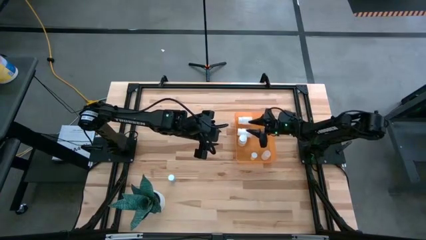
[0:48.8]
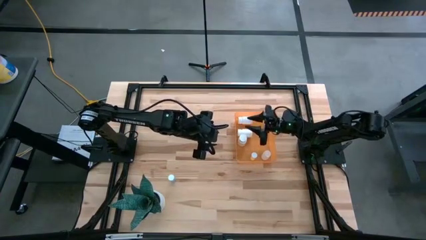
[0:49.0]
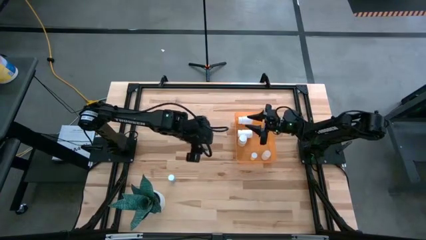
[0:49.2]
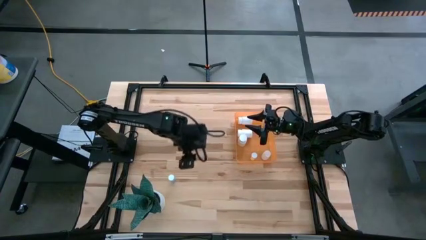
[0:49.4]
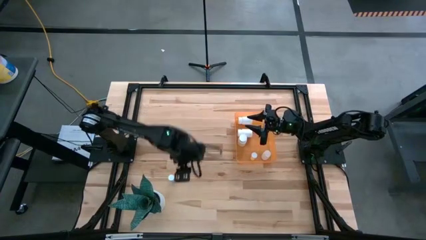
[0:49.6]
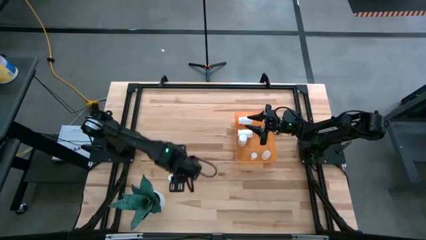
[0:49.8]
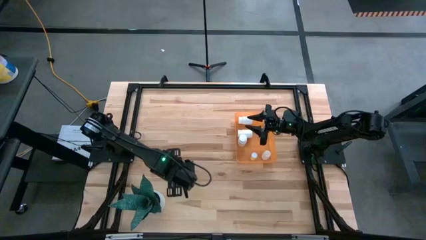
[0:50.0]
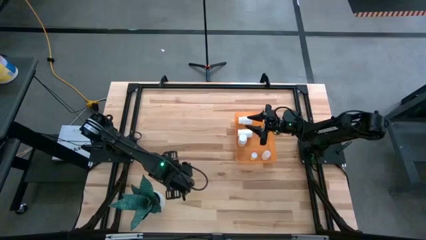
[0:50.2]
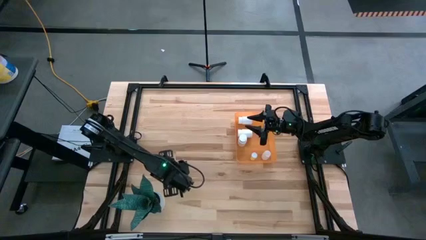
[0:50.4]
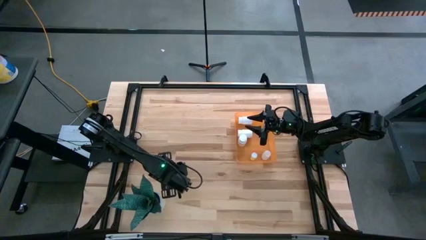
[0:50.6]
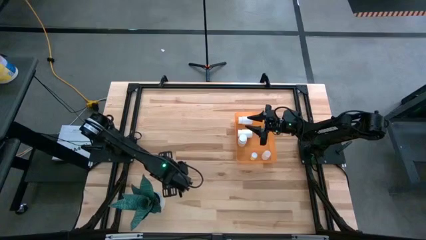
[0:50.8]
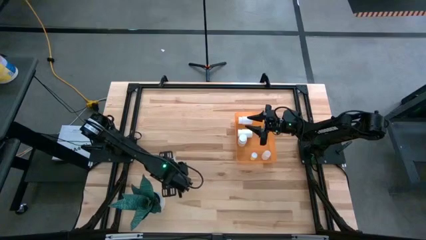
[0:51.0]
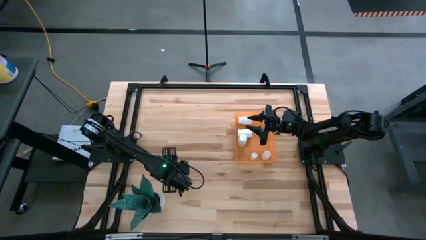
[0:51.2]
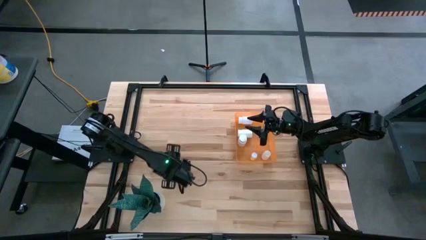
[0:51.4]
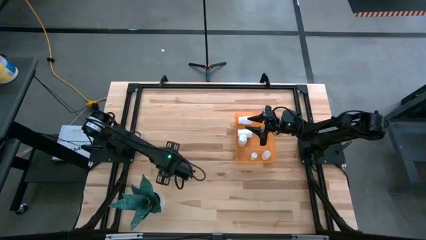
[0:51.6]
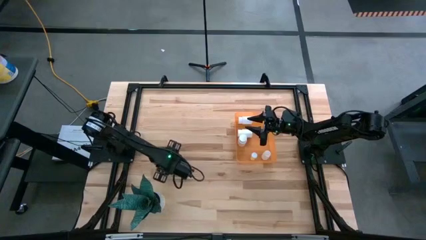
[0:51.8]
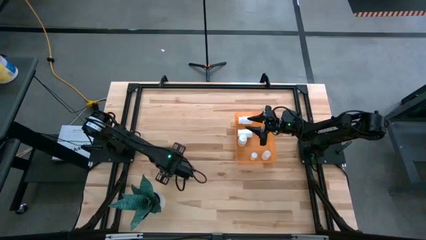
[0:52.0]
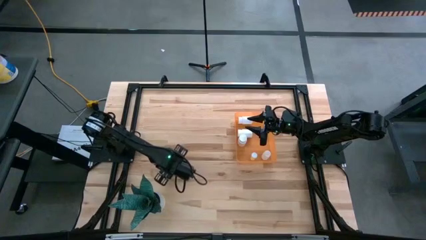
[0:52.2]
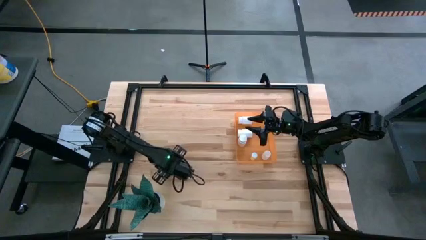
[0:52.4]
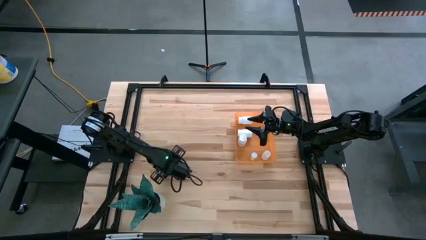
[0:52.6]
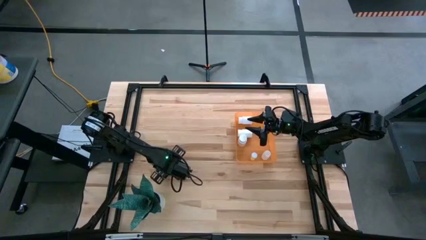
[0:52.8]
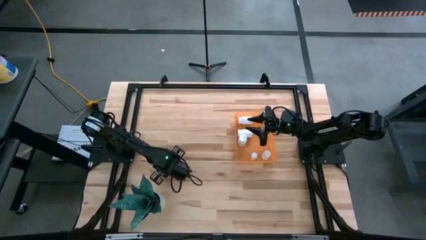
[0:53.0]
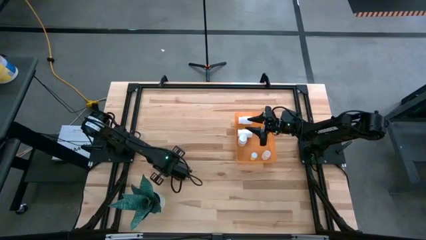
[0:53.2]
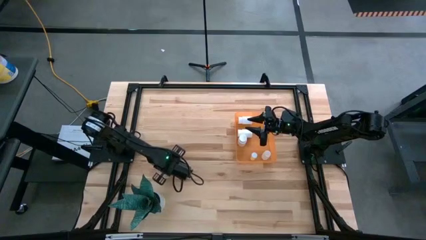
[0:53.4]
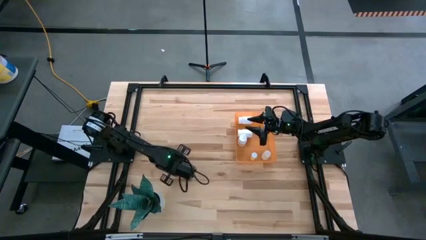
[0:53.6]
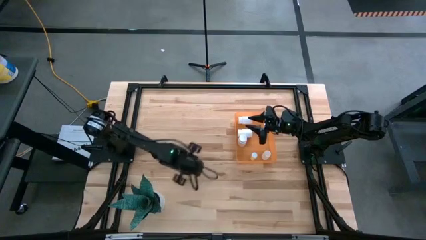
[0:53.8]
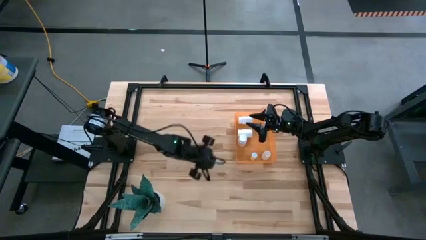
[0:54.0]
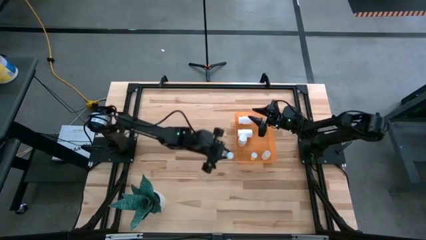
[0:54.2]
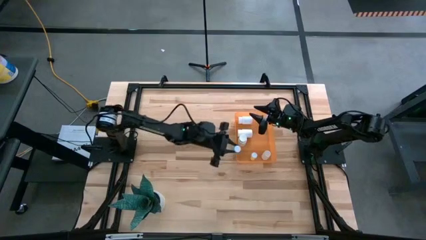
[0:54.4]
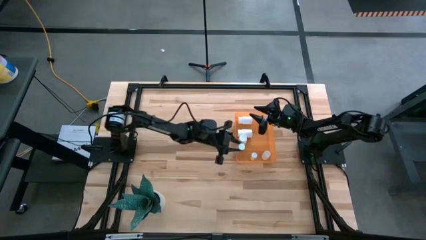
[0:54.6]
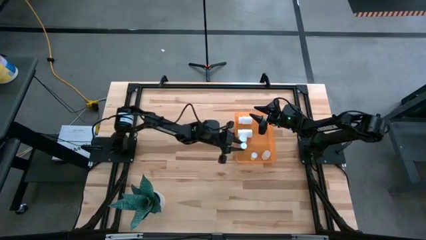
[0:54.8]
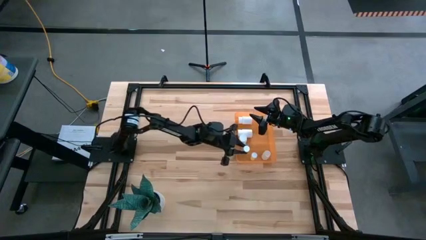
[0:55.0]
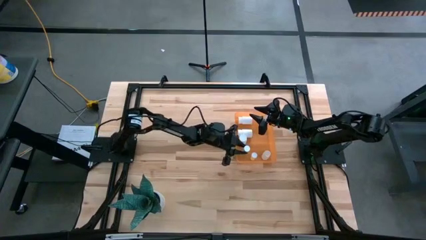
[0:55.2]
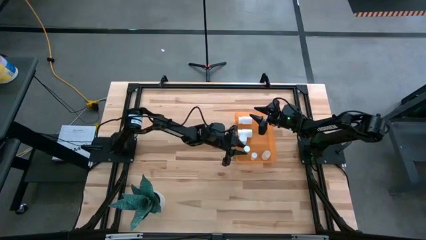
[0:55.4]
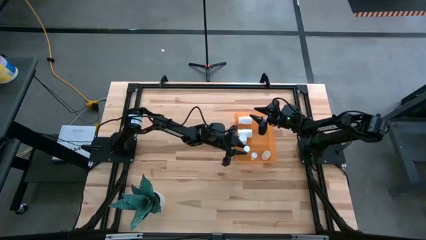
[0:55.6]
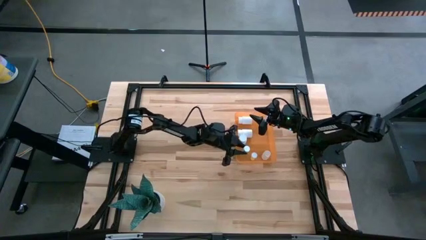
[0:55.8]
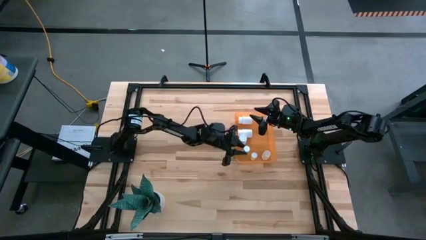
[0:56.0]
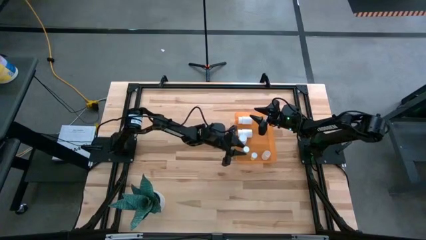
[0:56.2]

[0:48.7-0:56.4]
Task: Pick and place pill bottles into a basket
Put the blue pill bottle into the orange container

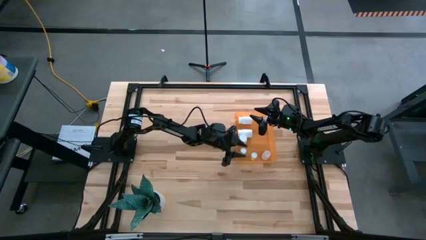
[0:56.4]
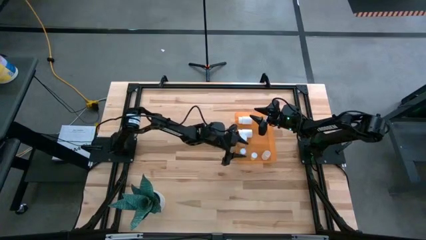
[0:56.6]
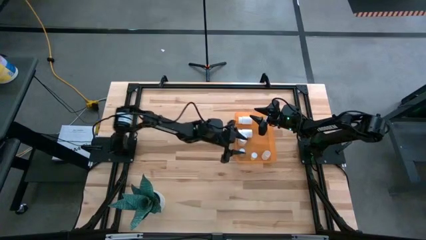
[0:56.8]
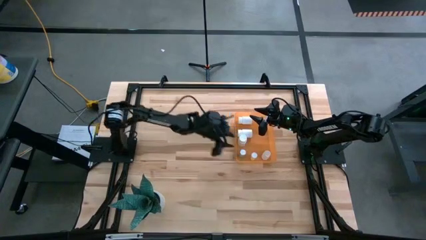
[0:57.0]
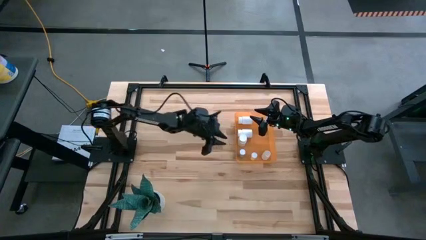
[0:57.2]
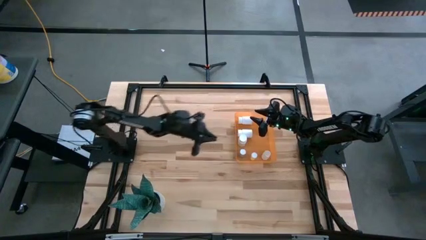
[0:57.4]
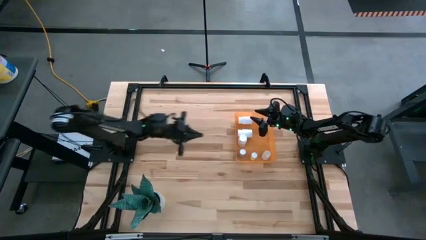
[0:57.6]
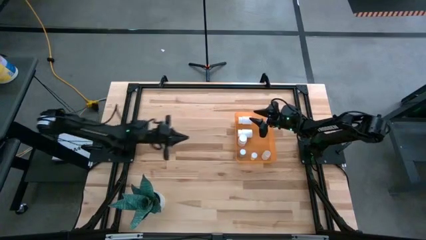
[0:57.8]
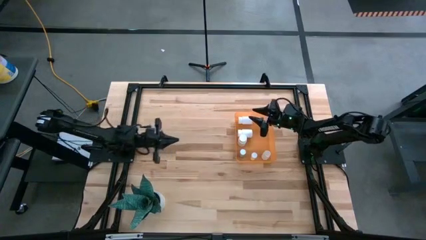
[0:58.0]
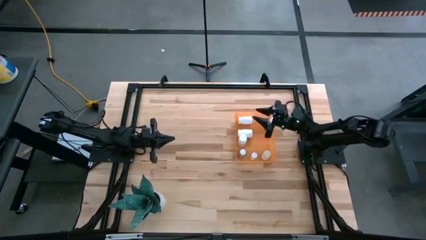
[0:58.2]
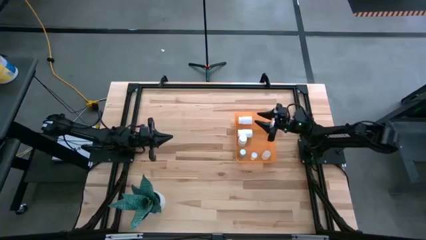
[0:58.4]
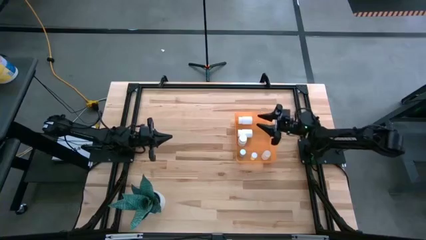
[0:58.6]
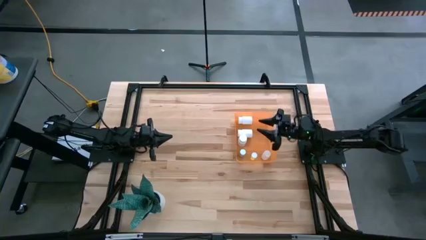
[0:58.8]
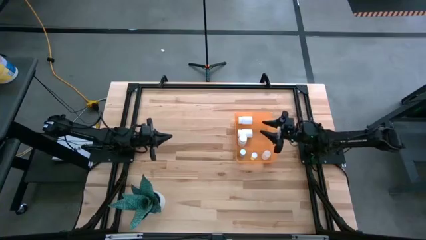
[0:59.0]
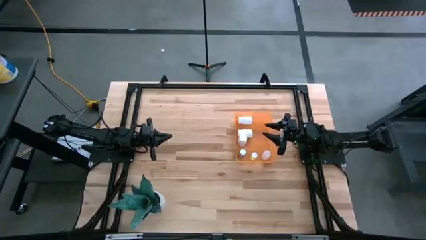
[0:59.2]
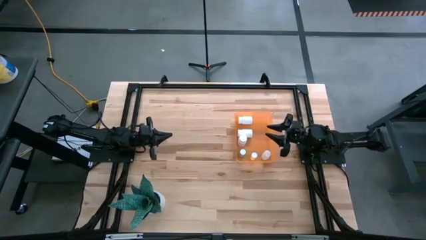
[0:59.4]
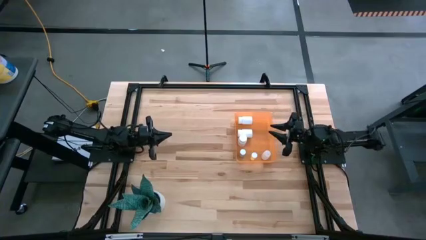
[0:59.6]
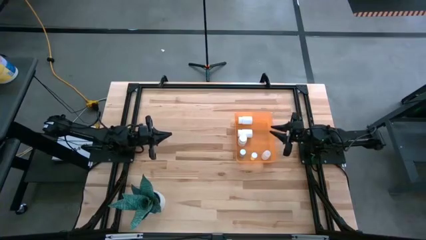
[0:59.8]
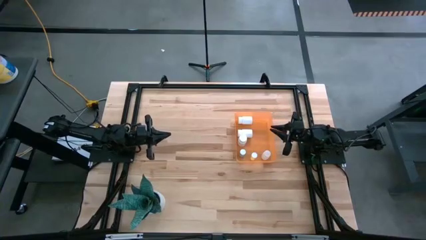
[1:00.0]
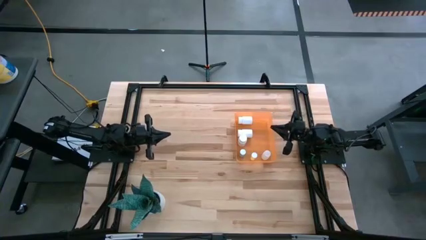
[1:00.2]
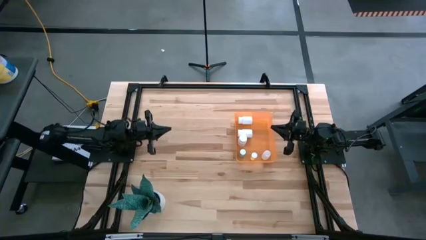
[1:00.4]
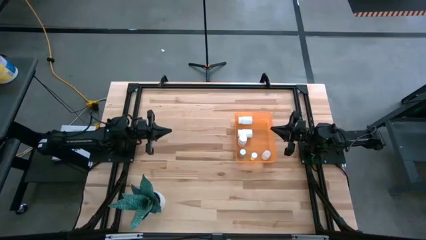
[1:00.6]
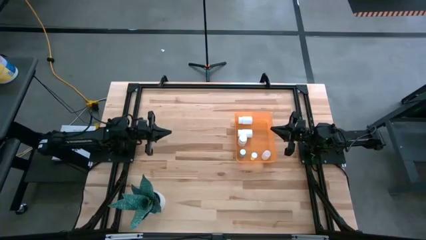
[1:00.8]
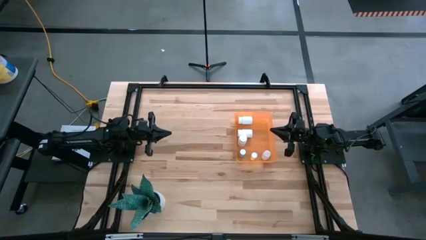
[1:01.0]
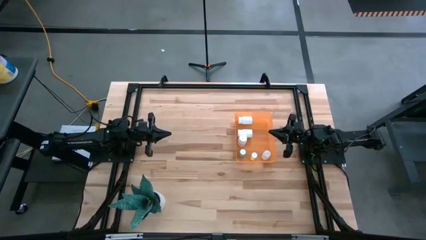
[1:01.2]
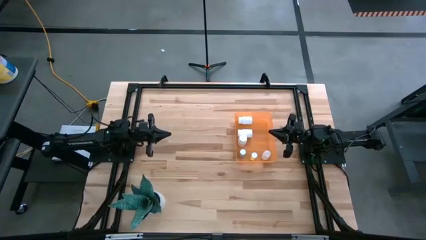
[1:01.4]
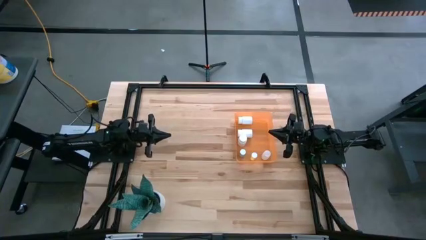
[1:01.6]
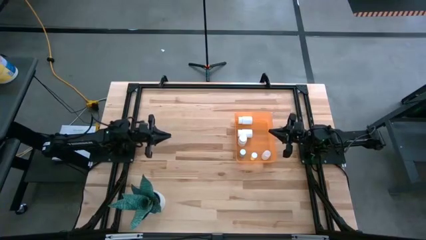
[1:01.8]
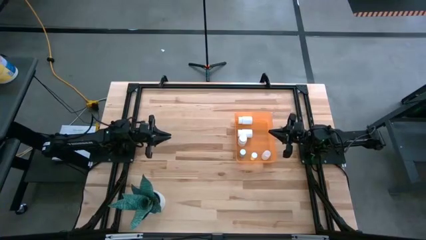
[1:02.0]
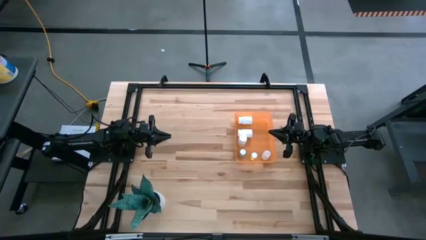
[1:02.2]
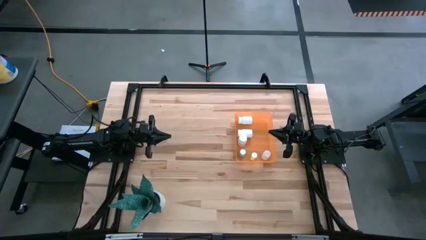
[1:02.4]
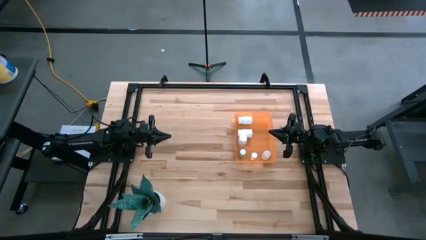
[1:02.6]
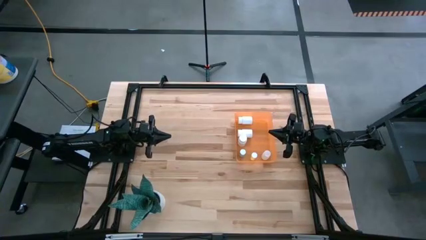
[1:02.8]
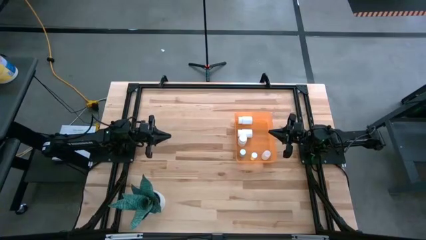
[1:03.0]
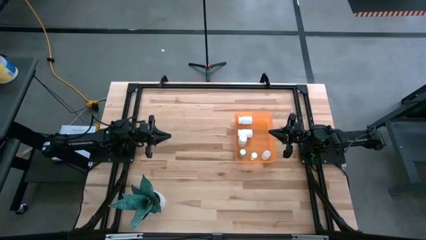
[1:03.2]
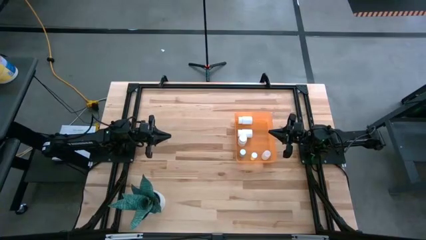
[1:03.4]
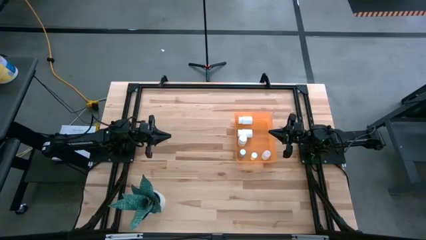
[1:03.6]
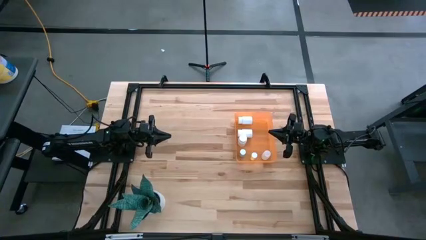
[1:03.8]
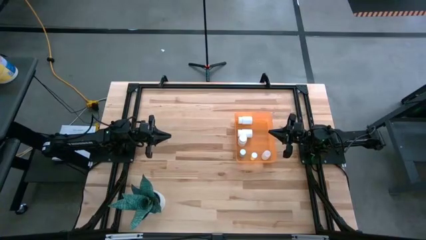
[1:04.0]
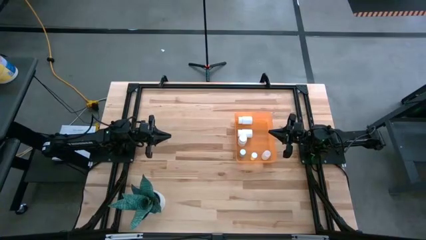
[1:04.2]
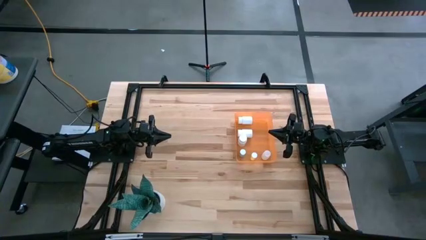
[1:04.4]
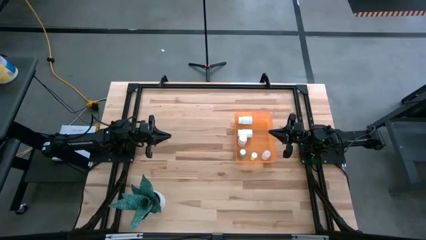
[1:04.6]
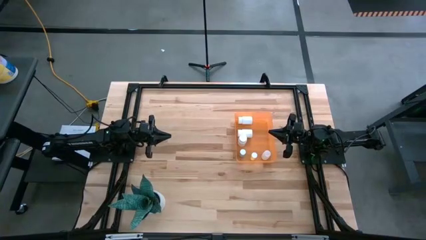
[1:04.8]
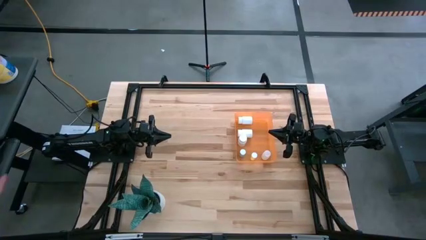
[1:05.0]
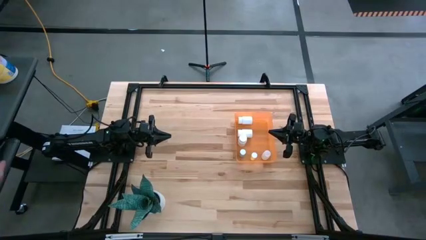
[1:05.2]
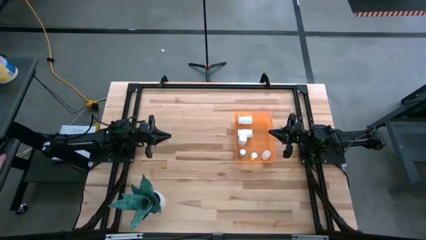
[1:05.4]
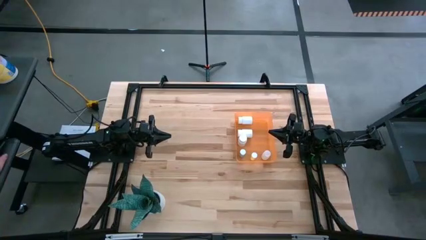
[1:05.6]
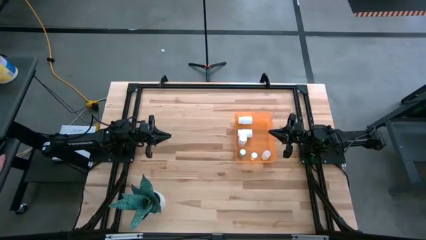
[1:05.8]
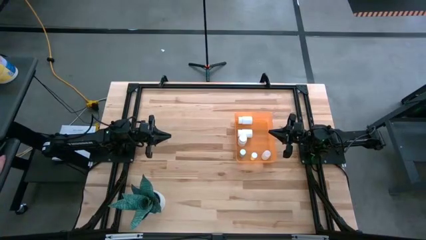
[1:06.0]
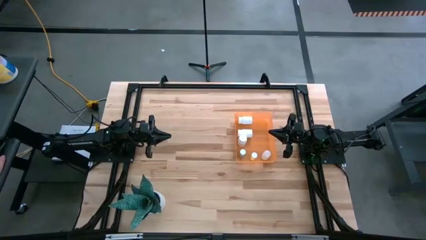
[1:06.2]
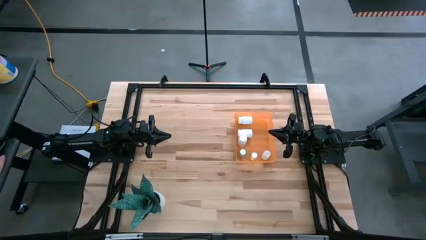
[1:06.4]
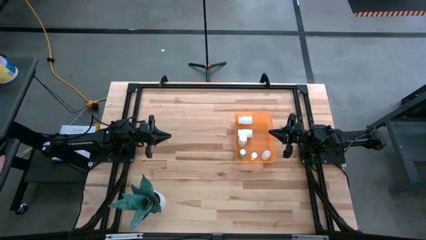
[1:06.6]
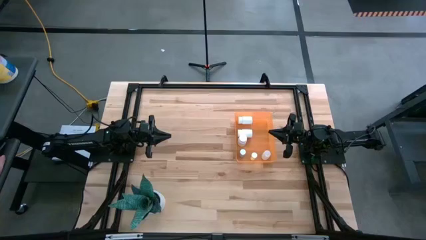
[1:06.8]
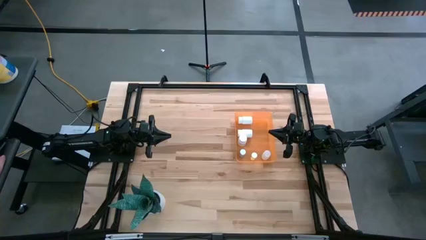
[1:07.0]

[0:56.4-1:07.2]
Return to Home Position
